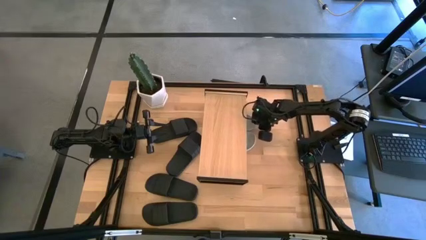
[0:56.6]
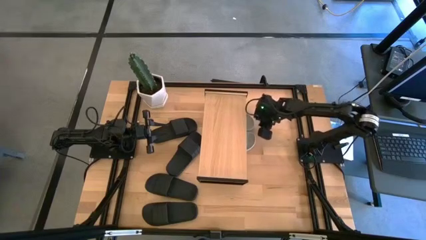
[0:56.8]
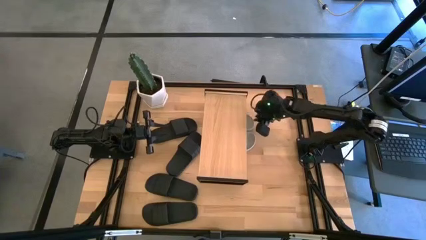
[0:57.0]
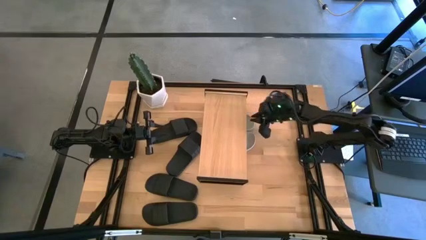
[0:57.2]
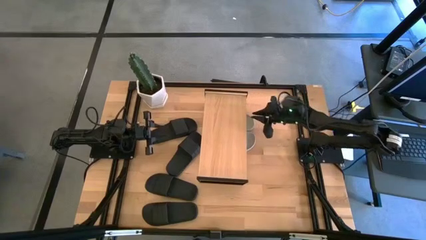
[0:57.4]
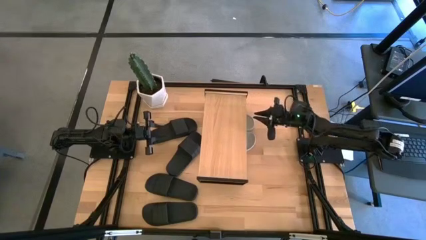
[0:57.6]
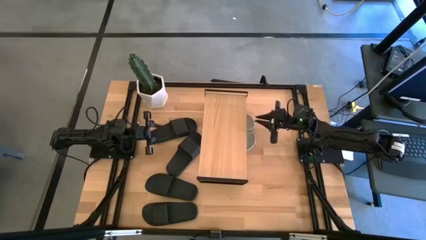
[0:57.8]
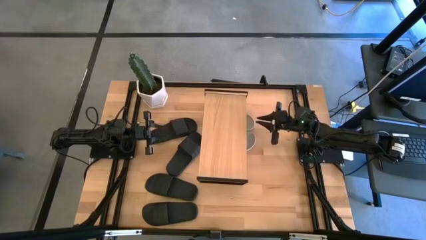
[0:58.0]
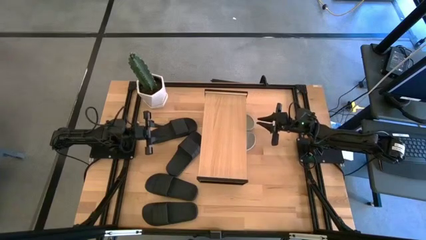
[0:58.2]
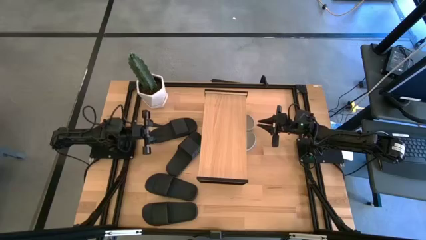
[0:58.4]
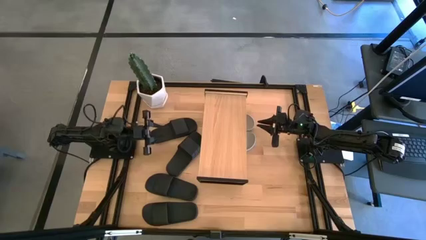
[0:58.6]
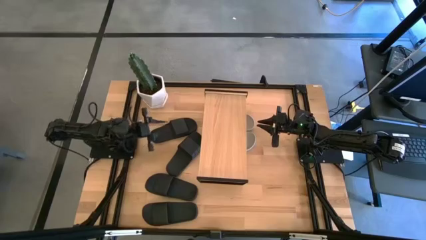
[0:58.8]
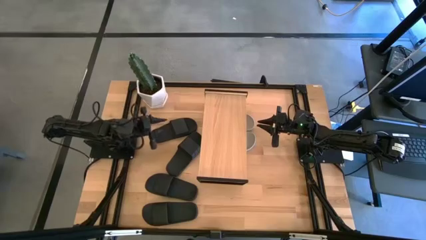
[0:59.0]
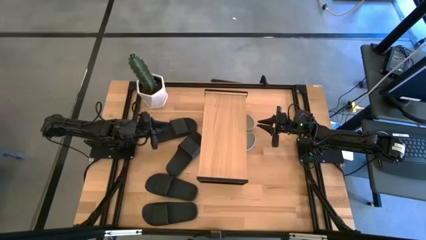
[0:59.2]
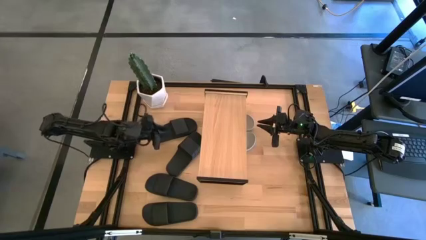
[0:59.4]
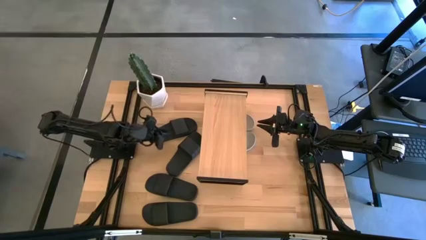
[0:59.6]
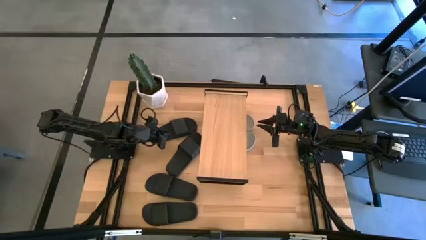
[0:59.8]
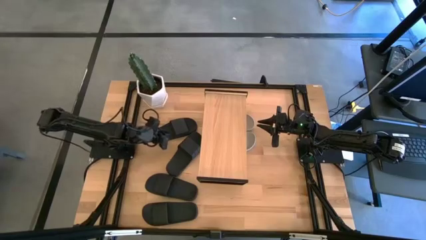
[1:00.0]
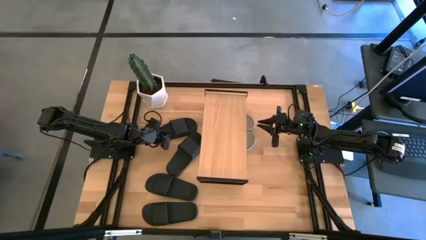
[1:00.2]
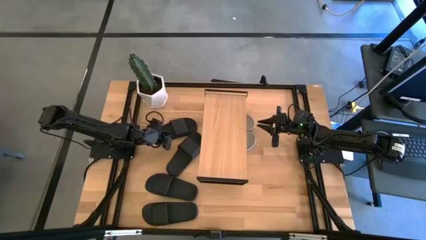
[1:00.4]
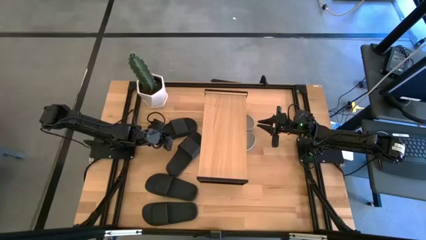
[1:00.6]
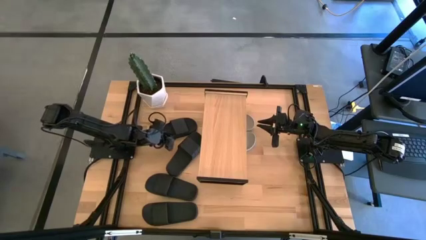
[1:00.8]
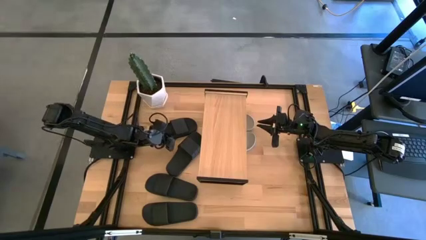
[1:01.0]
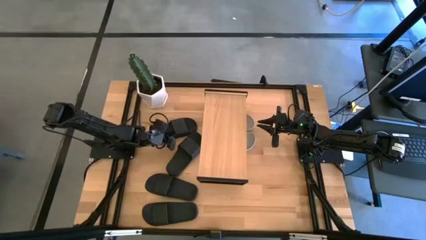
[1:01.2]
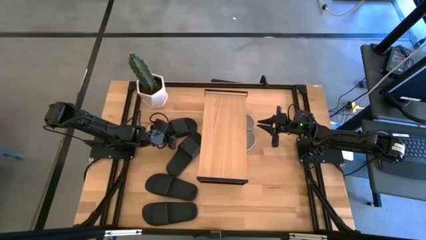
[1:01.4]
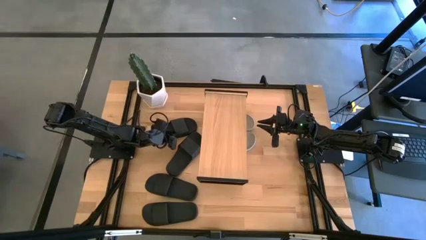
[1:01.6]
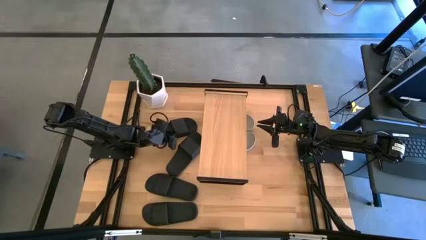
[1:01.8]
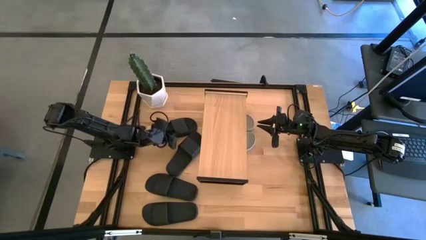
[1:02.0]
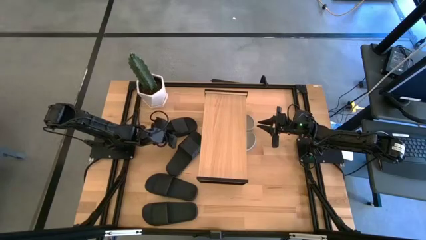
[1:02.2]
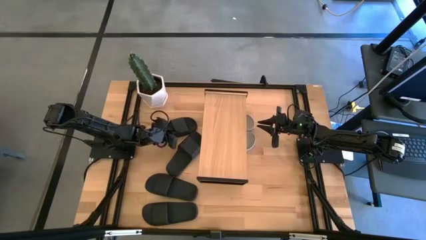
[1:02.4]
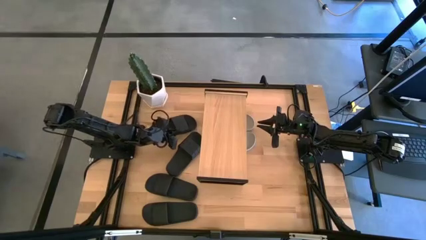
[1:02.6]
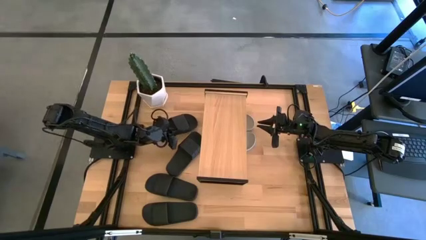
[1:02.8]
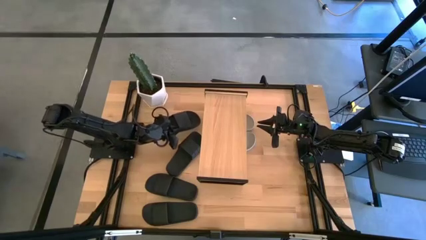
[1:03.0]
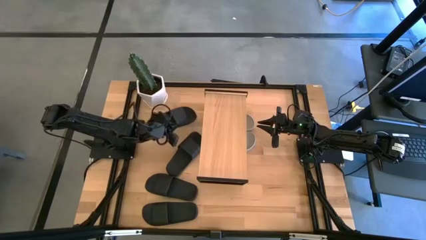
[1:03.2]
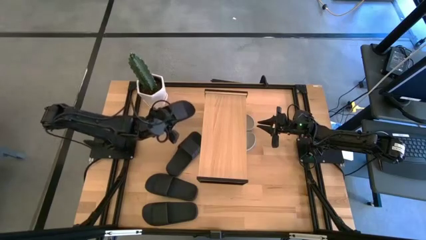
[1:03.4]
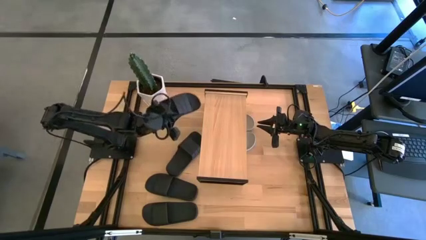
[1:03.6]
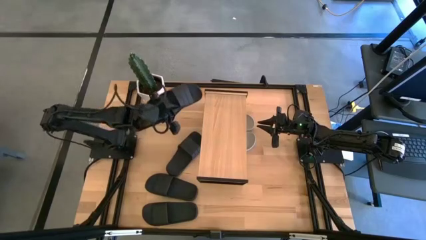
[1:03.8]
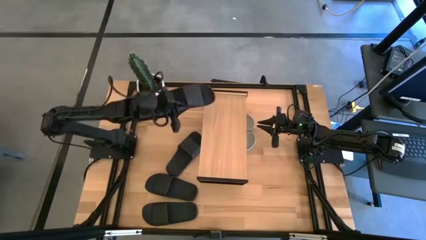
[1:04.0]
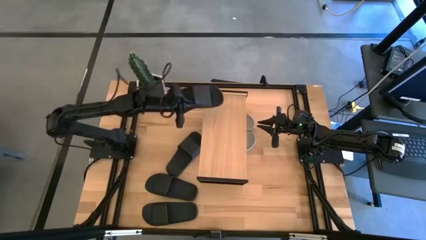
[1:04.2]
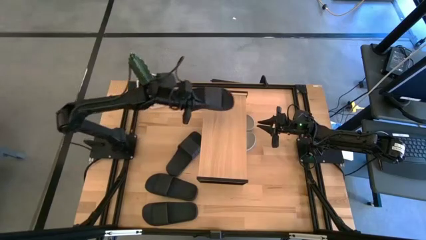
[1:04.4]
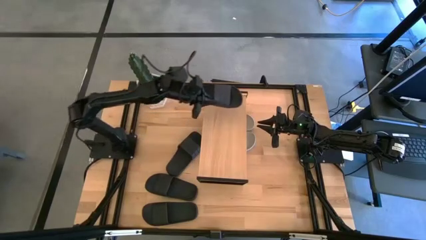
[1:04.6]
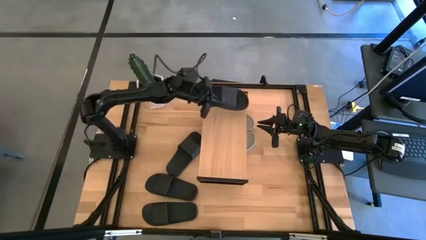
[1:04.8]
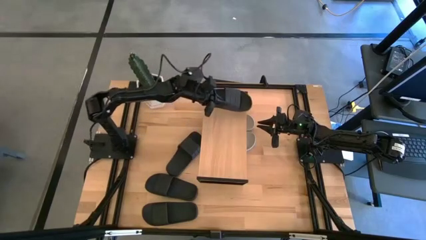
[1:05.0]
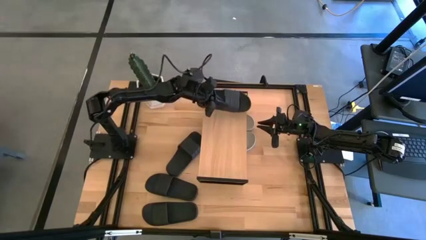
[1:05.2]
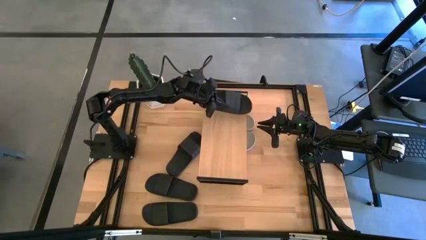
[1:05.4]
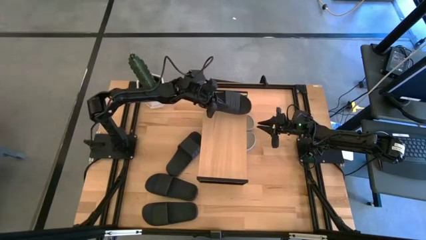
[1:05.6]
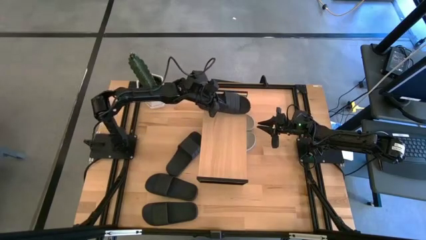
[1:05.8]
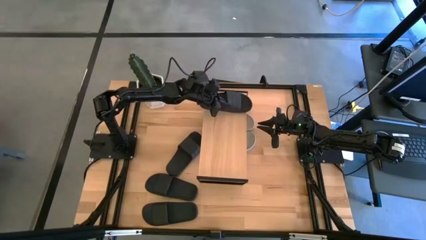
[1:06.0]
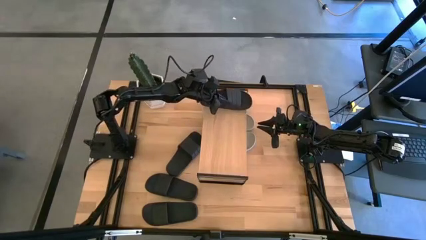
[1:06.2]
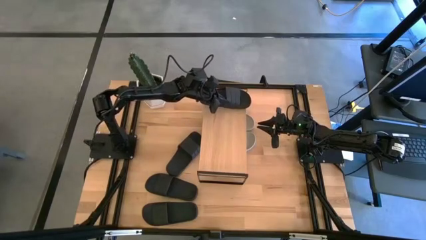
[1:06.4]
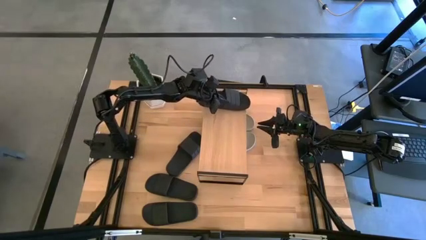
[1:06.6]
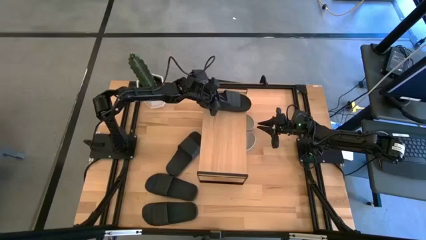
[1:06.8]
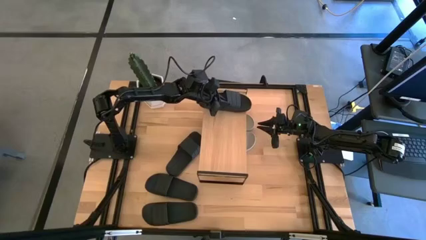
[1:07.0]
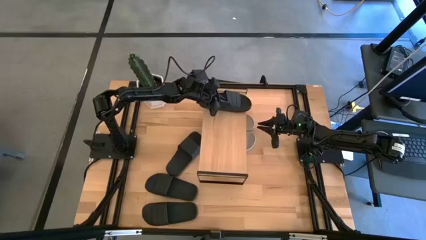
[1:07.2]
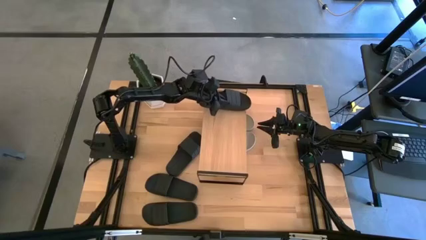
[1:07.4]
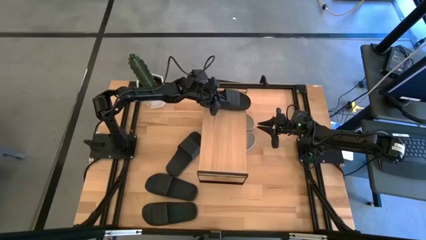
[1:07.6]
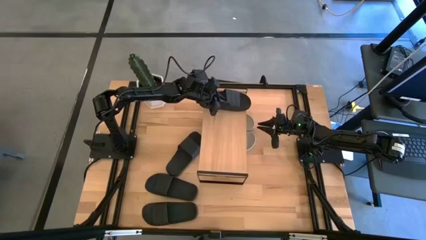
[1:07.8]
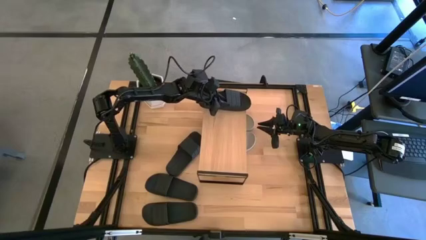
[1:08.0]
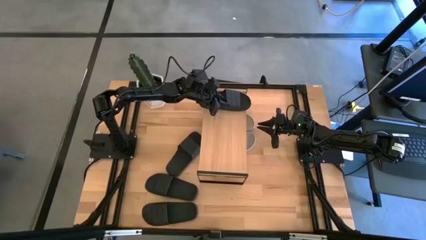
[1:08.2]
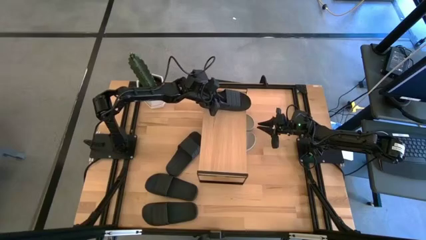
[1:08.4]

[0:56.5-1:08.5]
Task: Pick and place slides into the shelf
Put the black slipper on the shelf

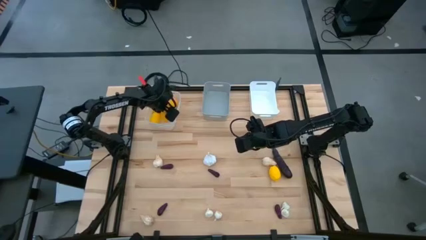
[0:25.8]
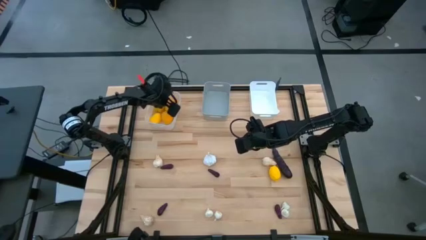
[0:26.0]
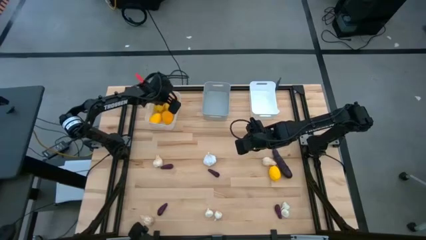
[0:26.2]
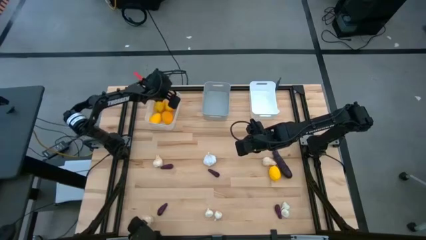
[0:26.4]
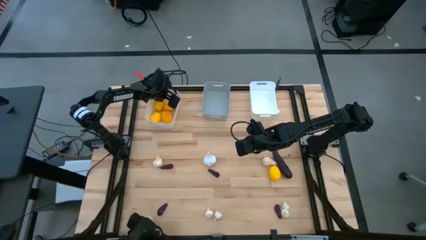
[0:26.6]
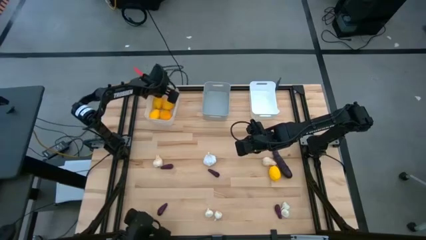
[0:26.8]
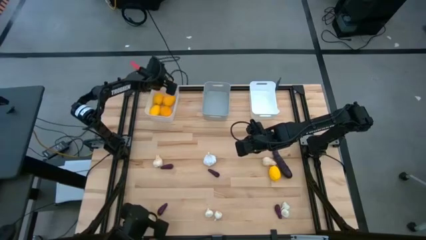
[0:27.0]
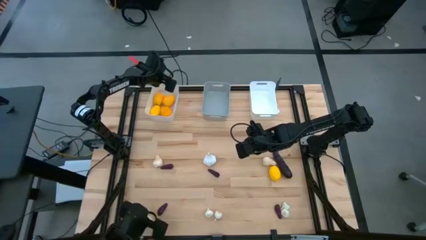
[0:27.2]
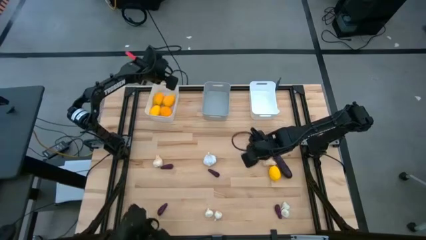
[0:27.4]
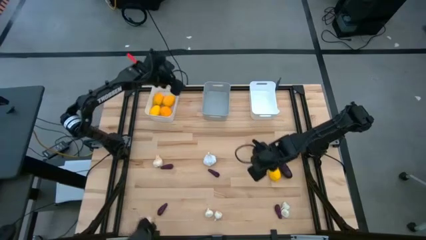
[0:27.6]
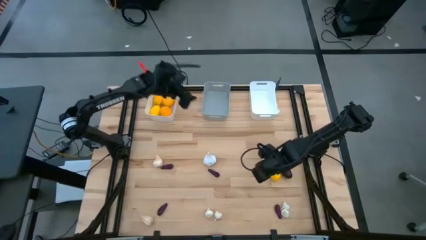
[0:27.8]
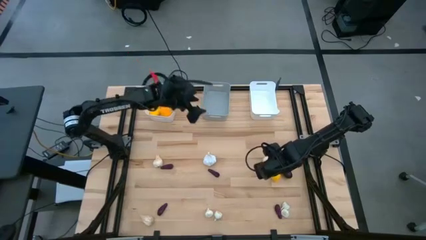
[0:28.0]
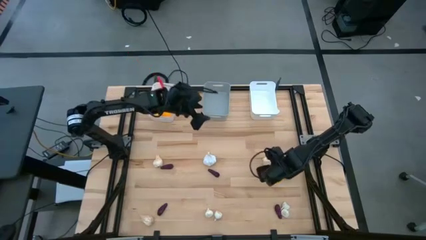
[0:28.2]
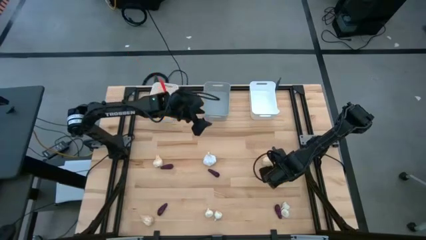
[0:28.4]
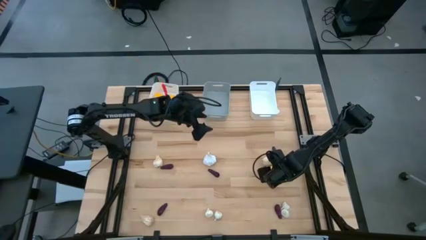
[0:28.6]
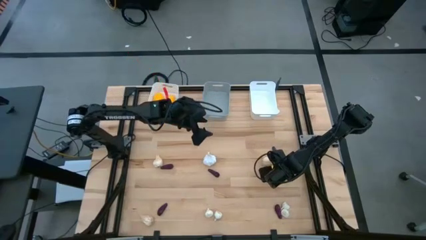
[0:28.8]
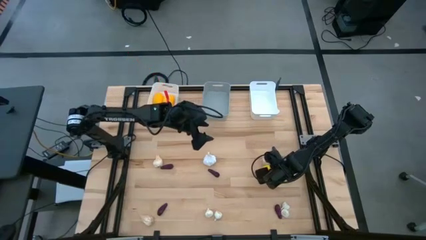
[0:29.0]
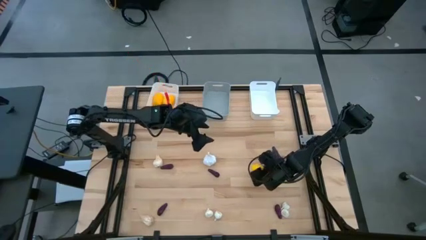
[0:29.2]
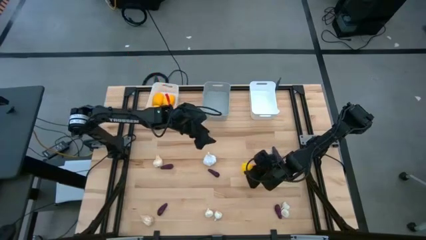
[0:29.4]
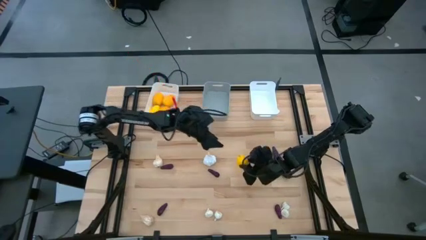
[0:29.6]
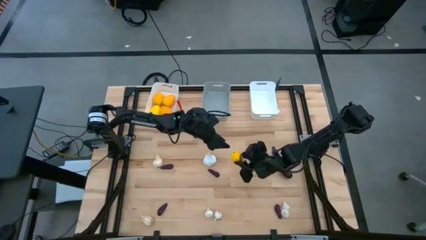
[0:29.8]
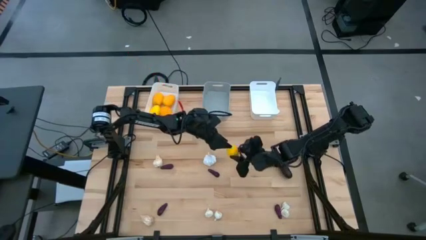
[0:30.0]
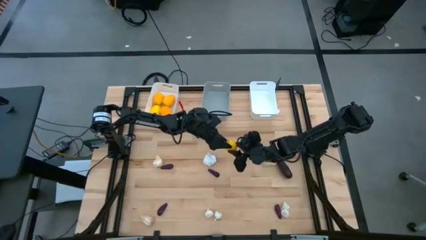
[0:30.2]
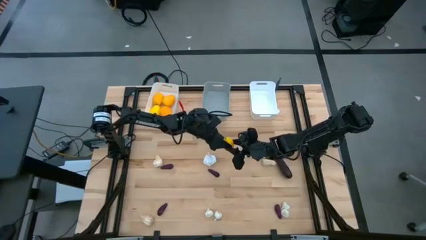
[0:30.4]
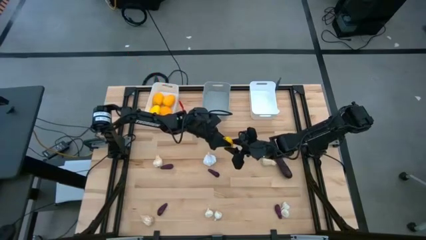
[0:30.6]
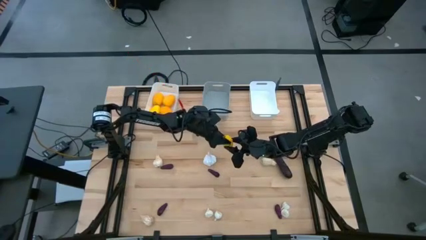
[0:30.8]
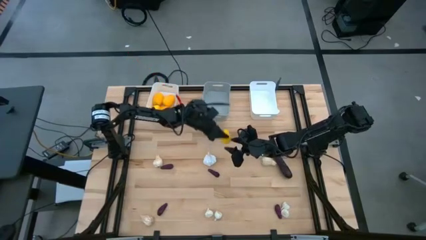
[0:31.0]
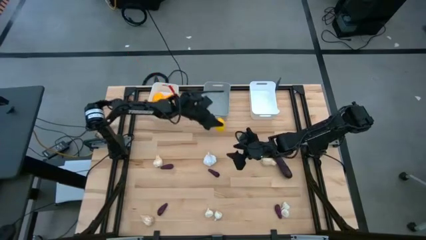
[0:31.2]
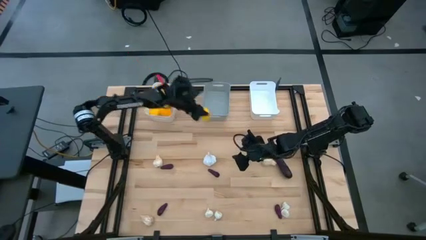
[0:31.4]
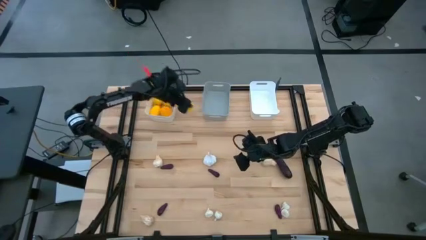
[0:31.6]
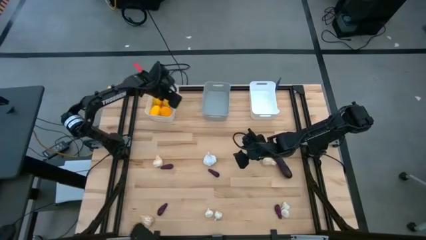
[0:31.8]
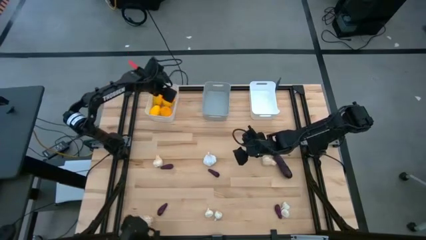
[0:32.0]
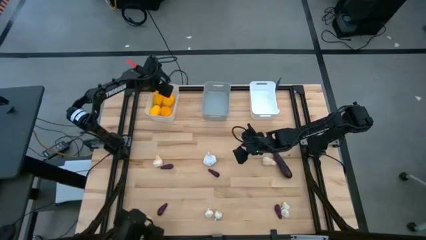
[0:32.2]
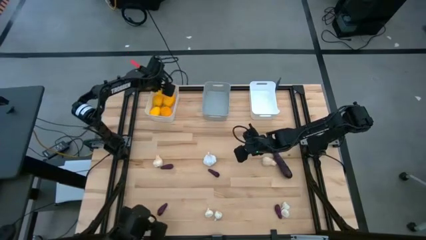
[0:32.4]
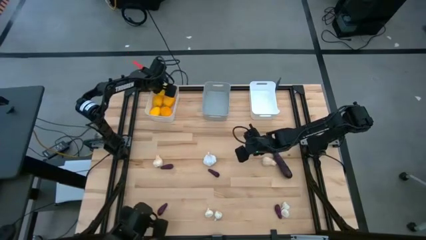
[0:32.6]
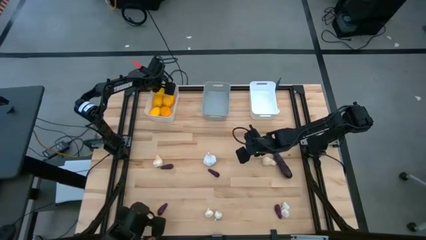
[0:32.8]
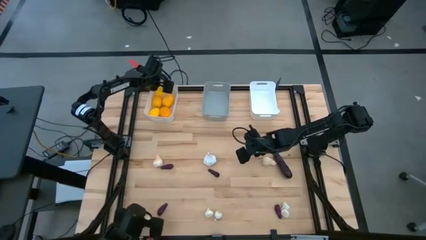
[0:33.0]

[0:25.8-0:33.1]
Task: Sort produce into baskets
Put the lemon into the left white bin
